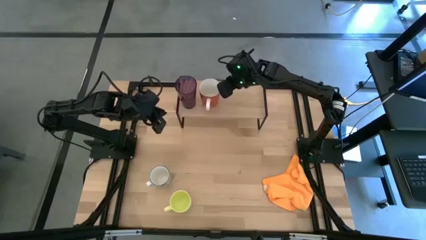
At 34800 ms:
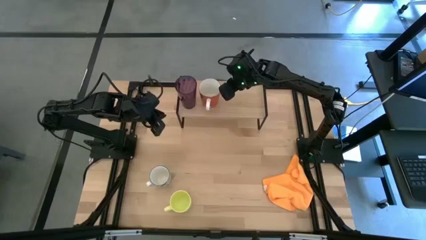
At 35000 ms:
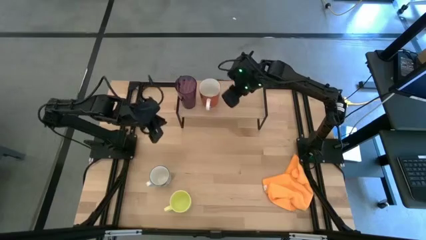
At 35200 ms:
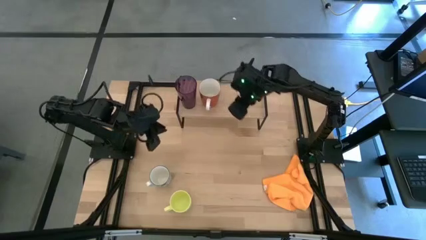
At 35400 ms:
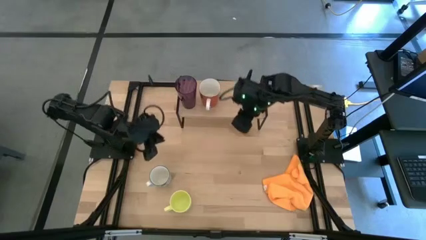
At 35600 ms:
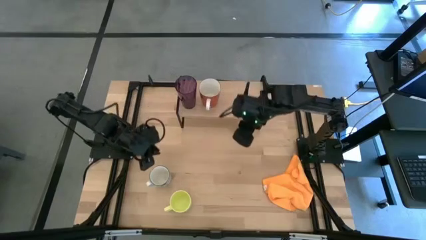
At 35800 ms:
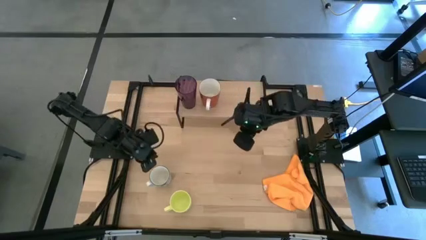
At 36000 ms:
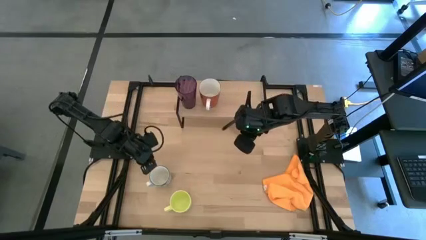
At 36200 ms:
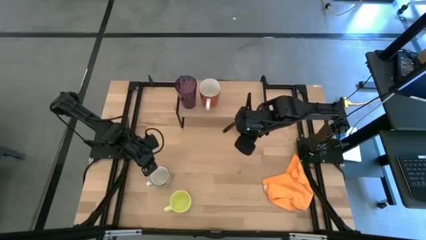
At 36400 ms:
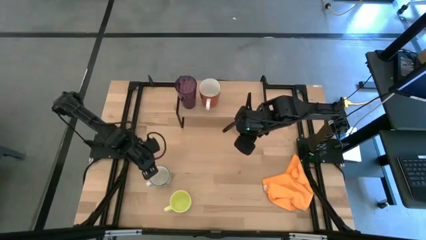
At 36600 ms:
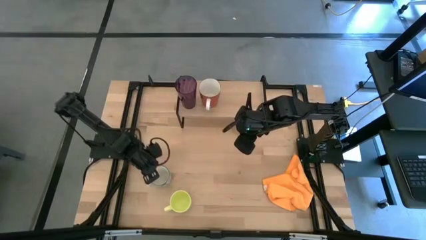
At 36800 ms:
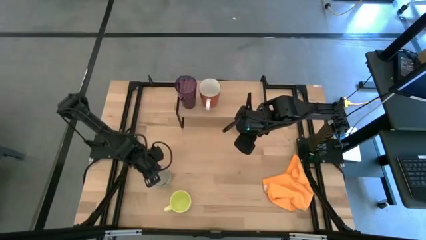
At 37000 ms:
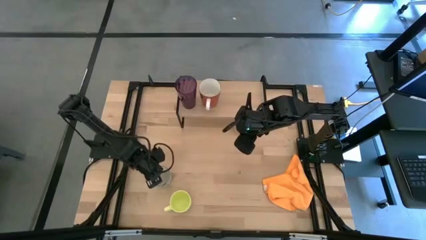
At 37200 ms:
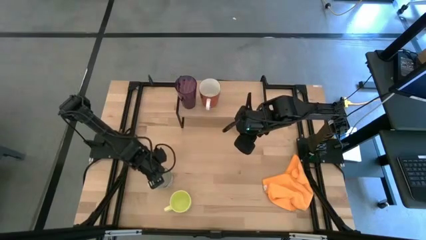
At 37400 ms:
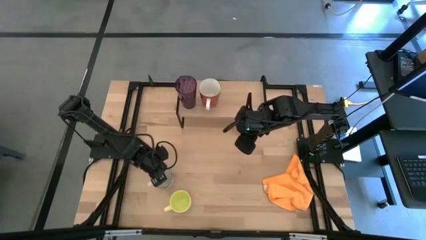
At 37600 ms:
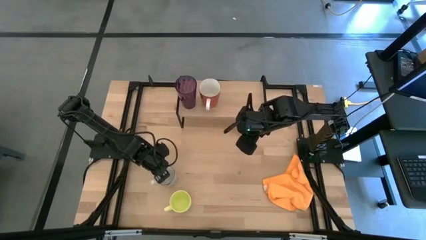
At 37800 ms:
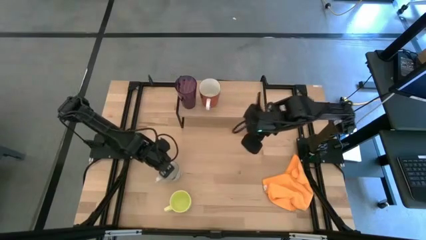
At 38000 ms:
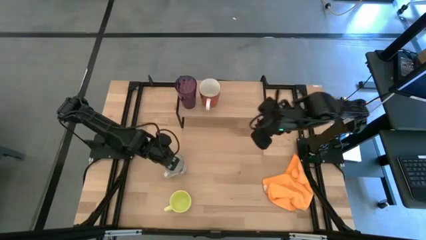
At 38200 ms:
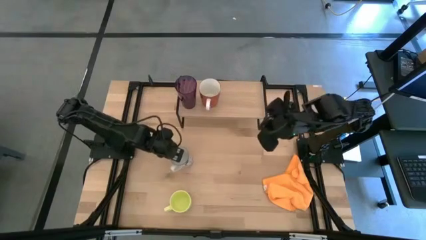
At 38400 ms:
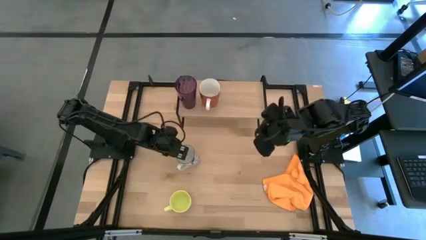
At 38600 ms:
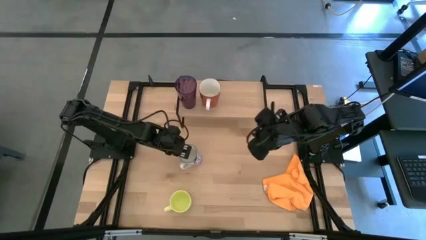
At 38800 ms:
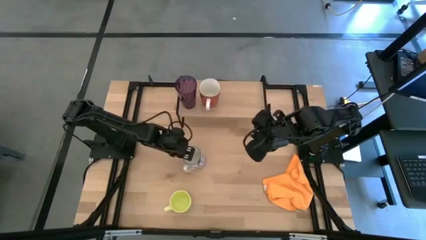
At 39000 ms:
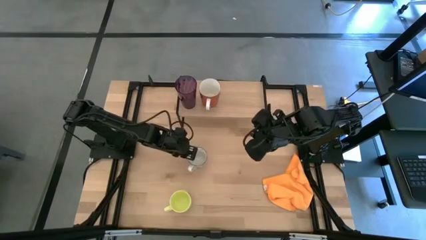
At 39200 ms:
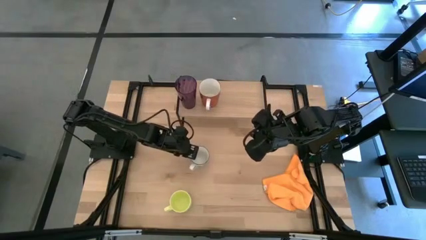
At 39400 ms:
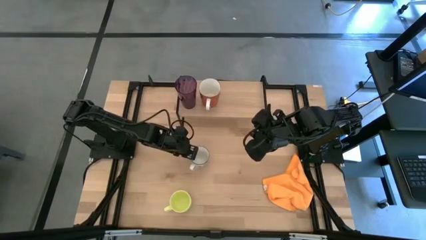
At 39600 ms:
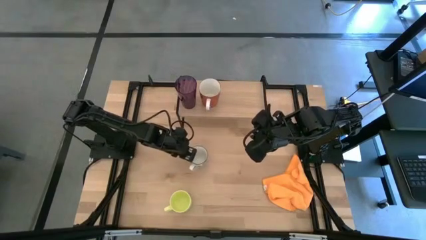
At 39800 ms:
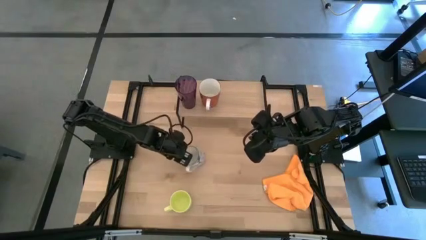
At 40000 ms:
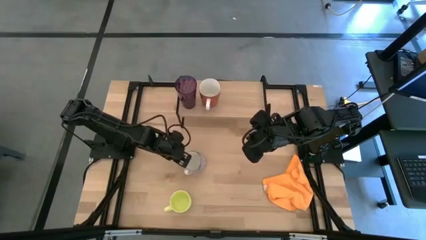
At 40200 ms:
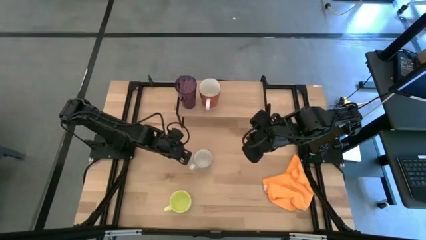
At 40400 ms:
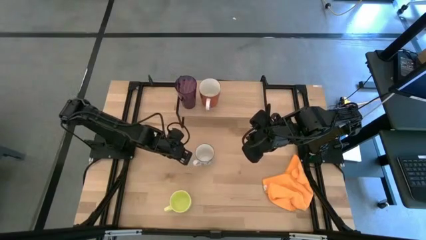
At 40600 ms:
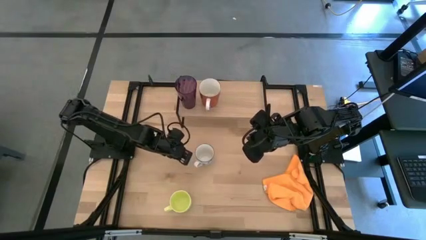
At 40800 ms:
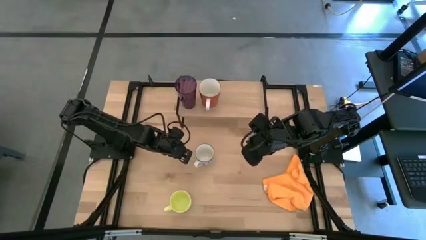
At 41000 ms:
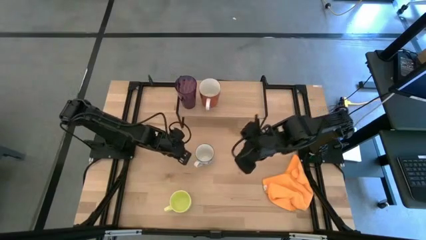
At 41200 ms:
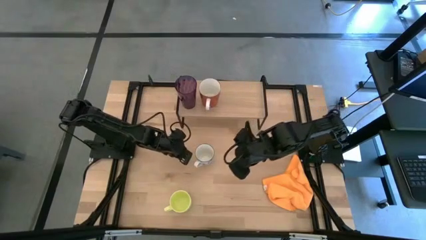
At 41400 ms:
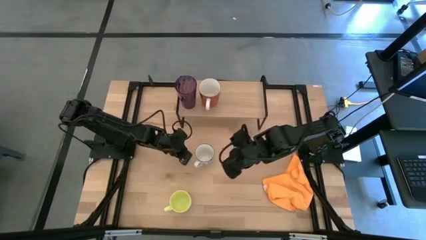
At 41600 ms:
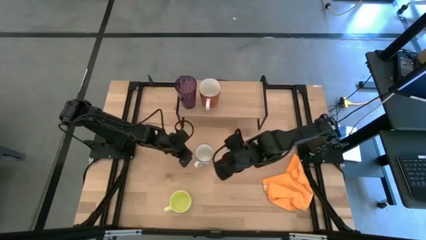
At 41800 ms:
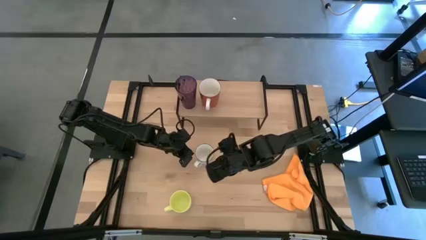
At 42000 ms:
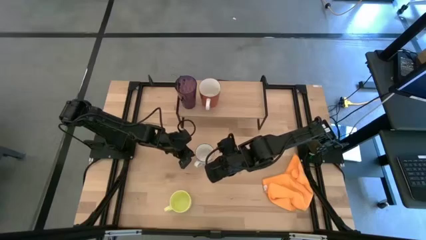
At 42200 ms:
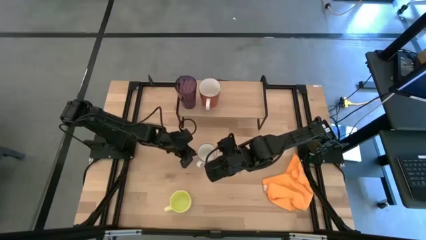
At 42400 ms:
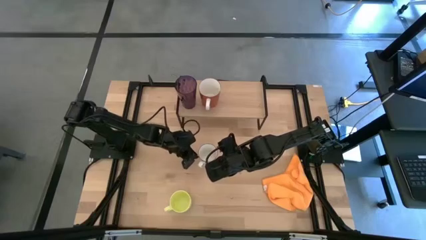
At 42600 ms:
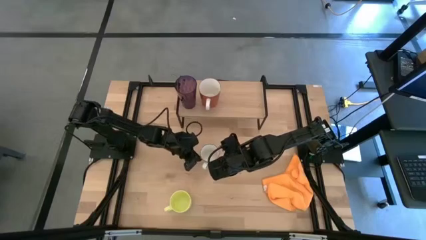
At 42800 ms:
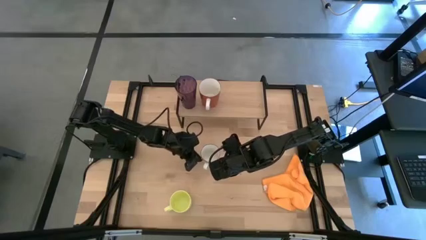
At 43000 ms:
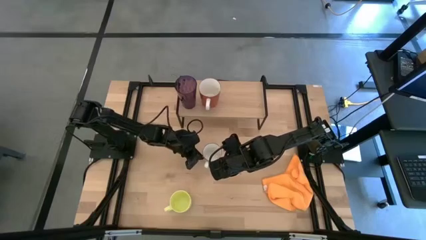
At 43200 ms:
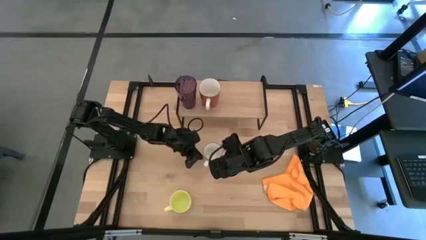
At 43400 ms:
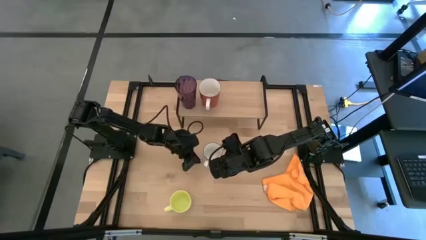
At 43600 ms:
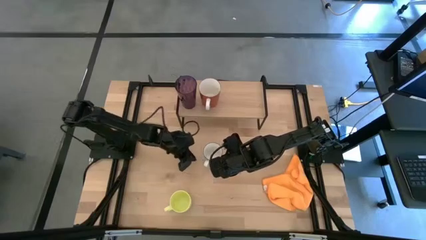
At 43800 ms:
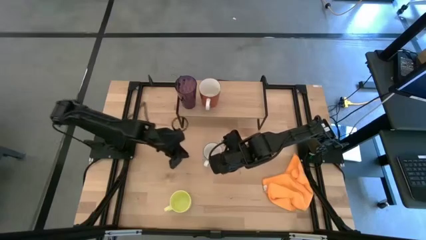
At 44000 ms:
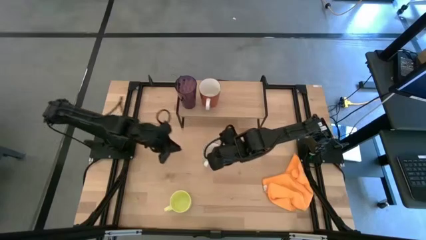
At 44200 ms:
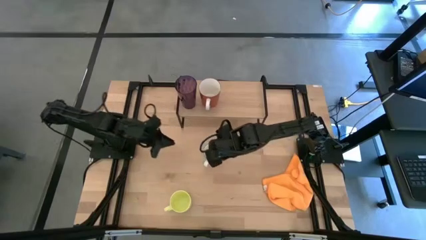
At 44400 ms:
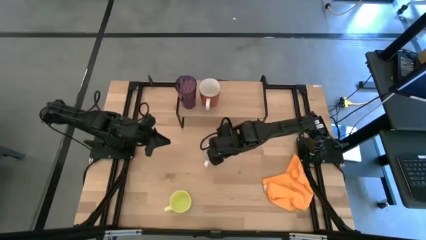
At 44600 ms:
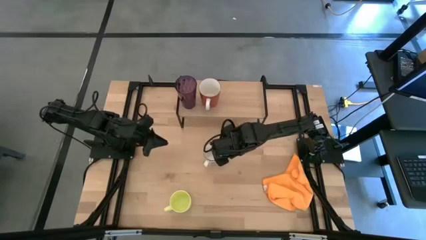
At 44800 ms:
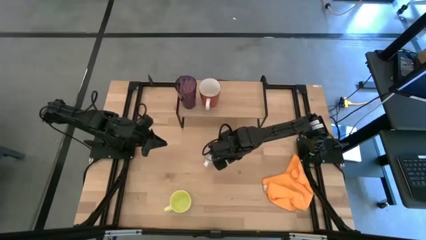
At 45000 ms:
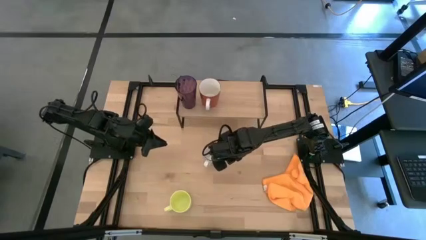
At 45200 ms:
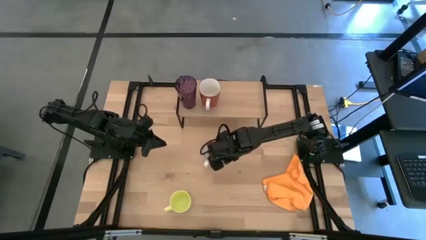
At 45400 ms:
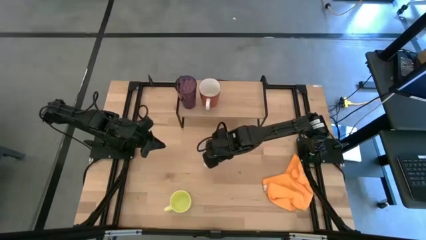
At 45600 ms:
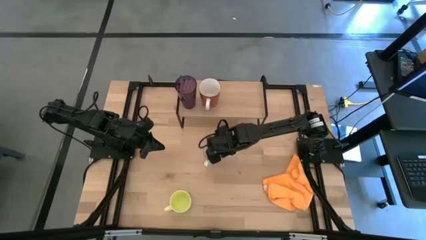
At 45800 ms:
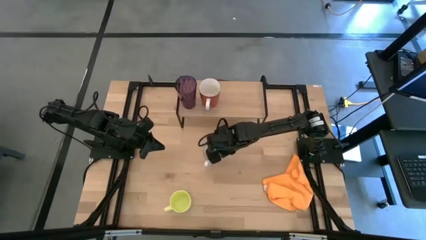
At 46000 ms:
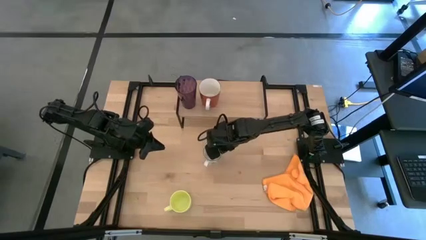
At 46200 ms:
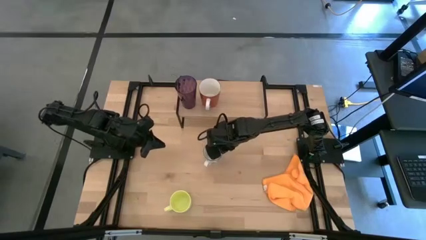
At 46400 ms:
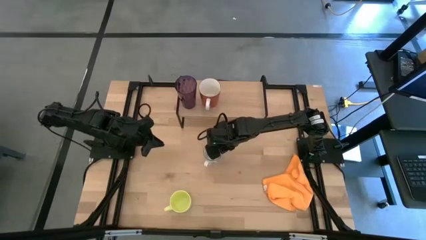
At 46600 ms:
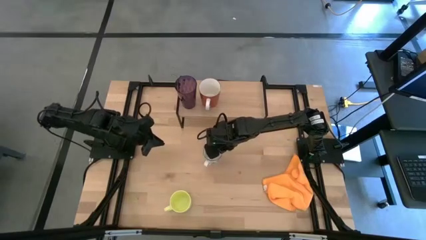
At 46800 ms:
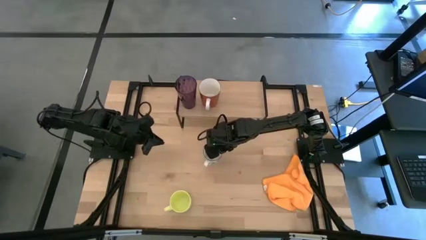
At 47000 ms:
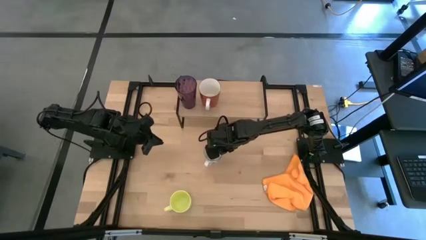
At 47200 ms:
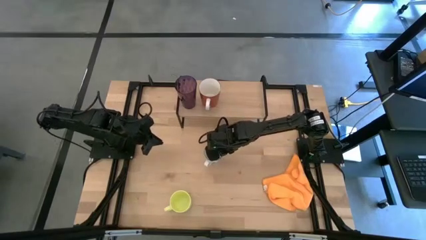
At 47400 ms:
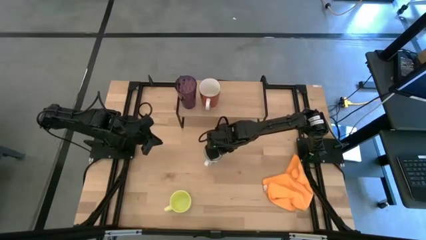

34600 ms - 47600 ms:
Task: Stack small to large cups/mugs on shelf
Put the blue mug on the shelf
